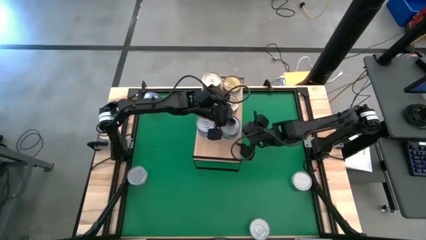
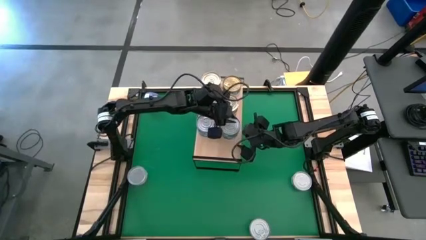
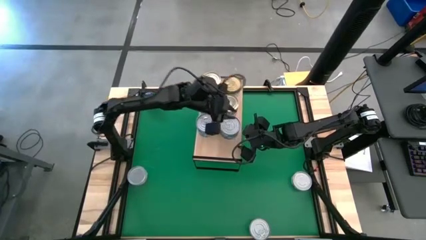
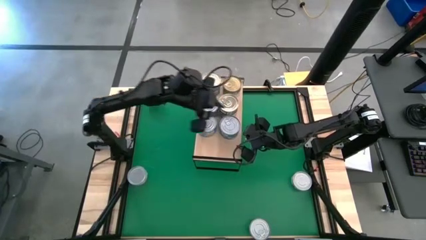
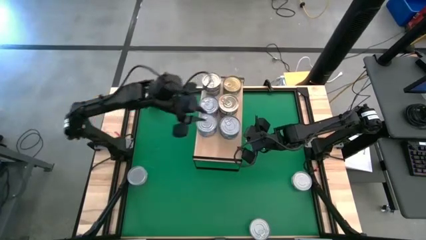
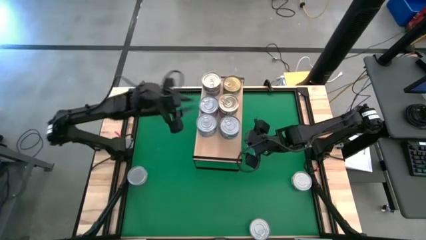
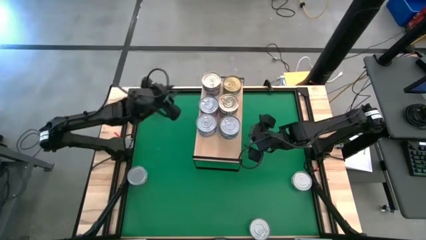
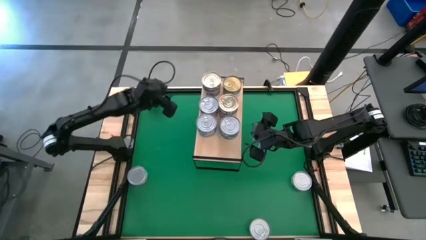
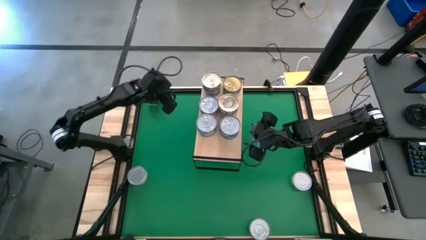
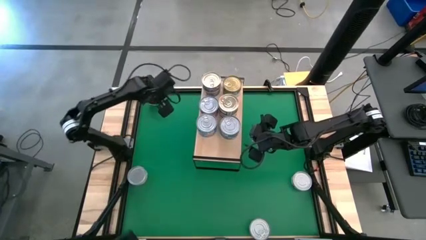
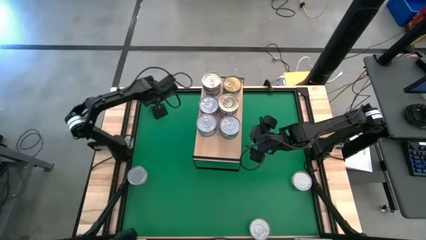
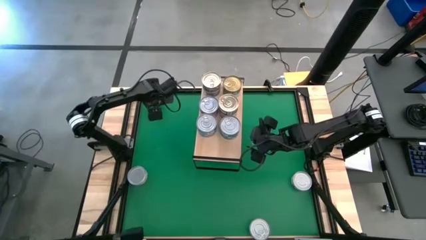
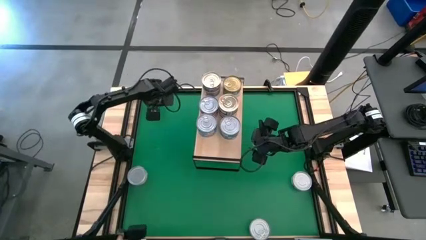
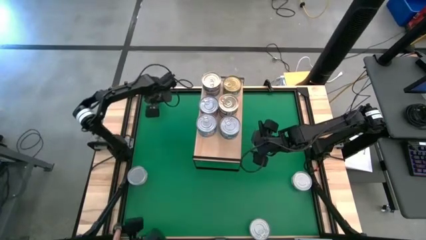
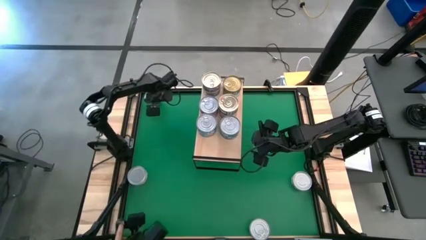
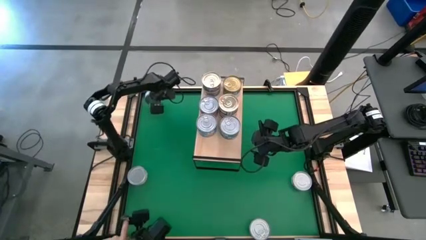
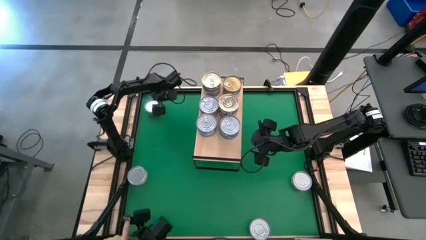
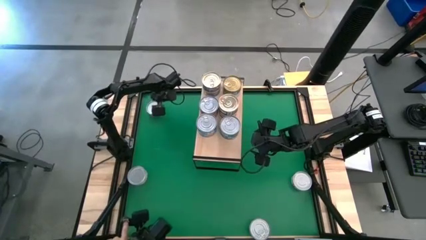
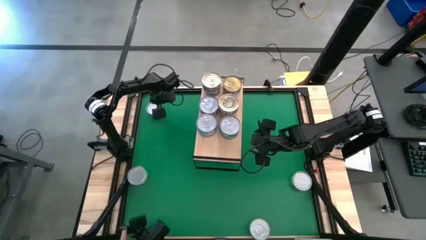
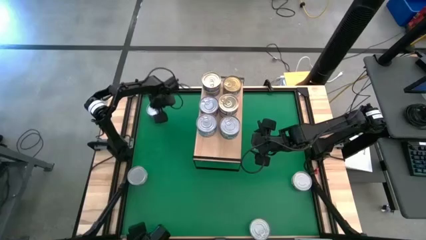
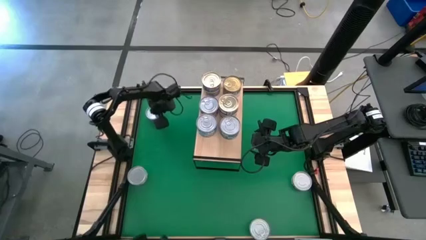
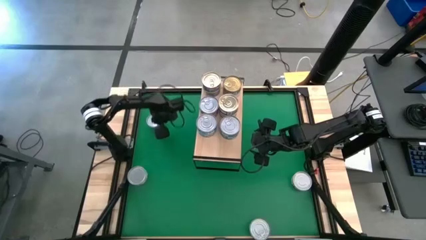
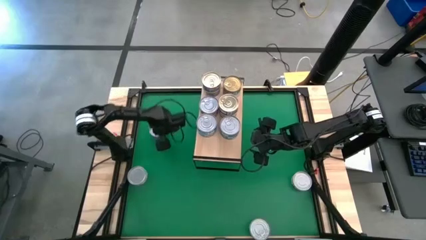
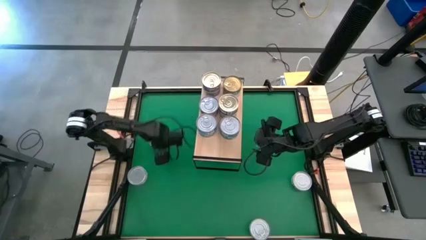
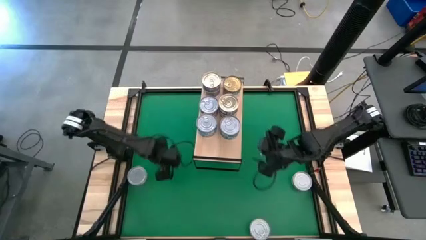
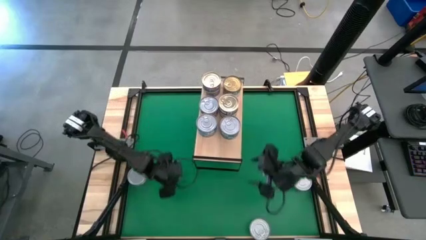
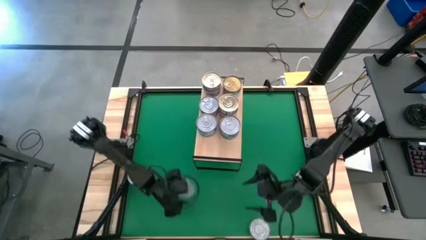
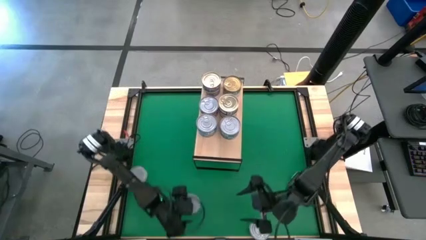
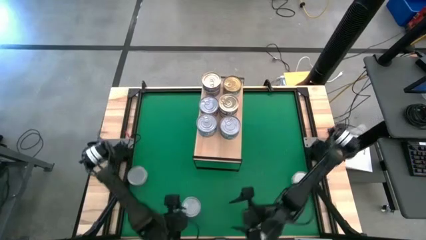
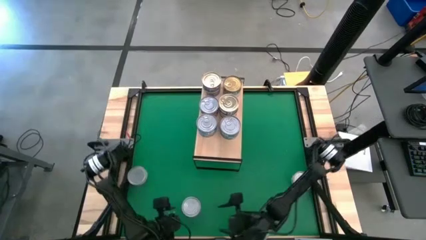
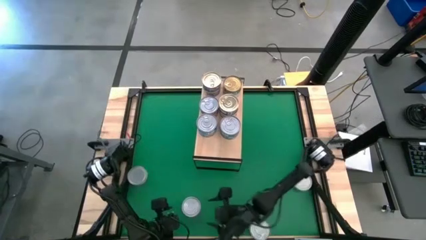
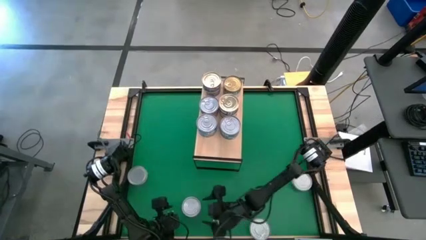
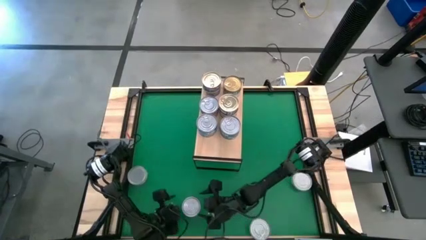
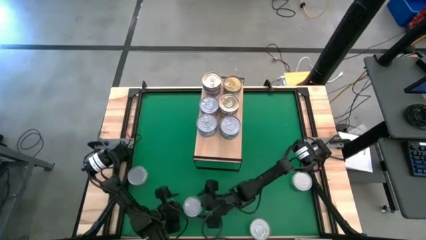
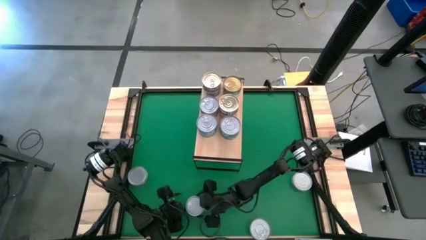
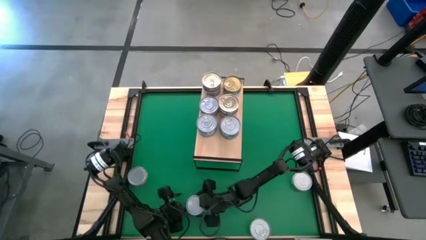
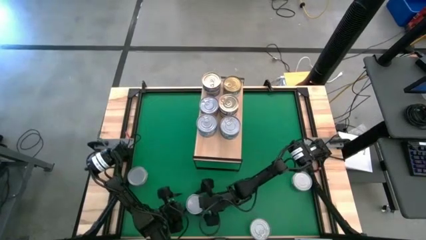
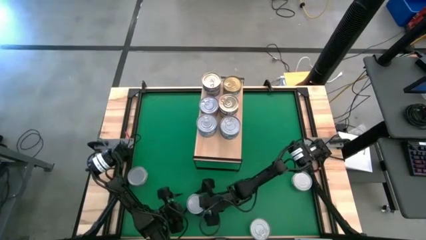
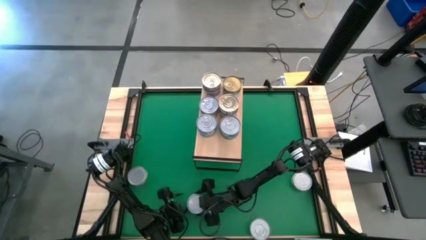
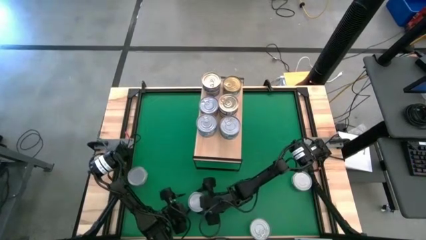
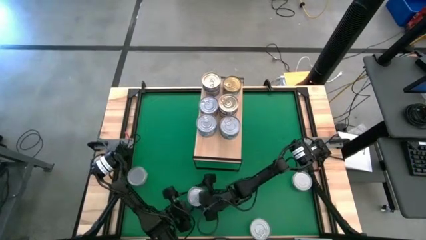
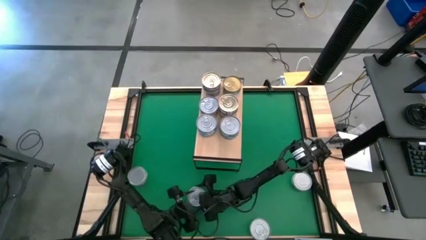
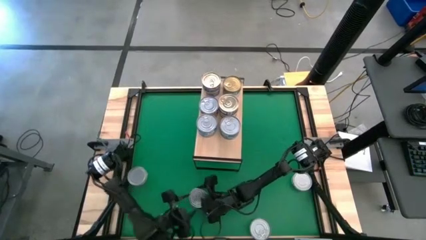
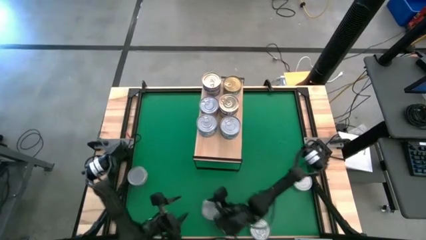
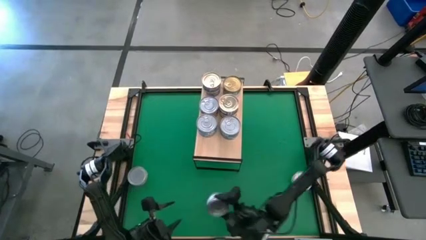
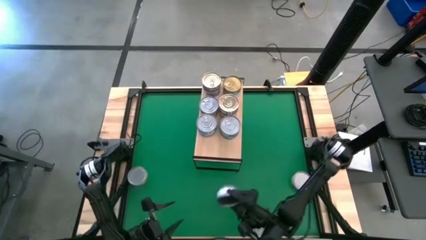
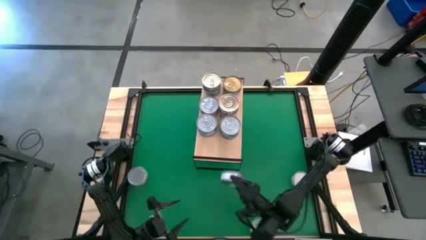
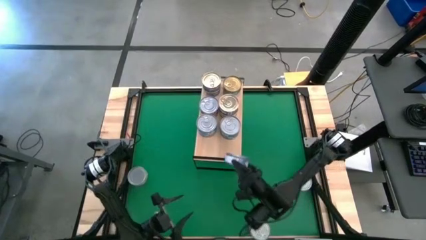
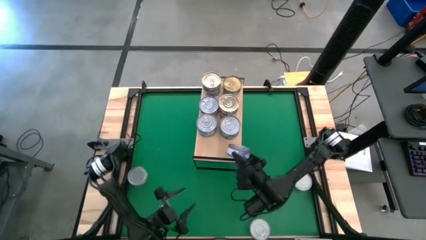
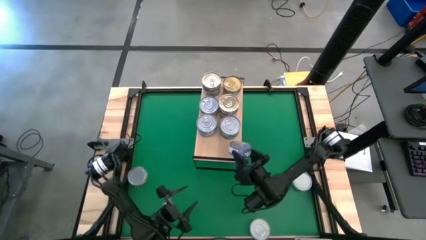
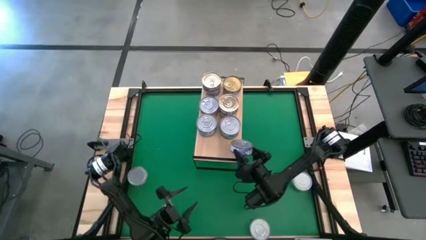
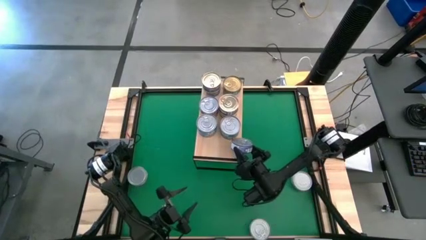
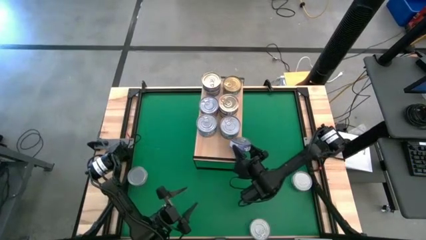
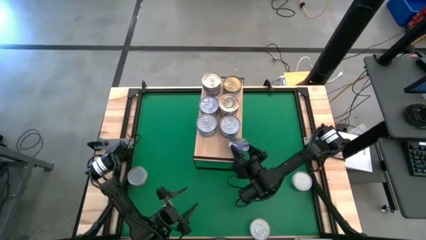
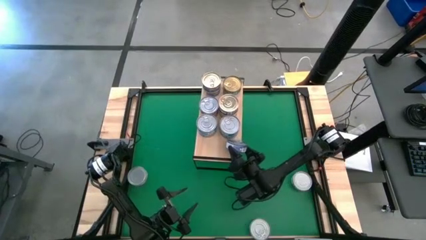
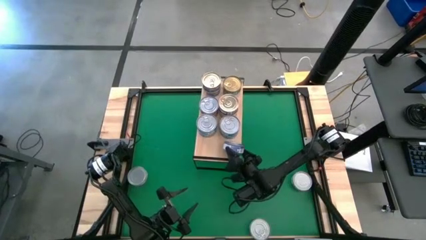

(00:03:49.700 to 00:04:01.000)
Task: Stack canned seafood by type on shelf
Put the blue tuna can on the shelf

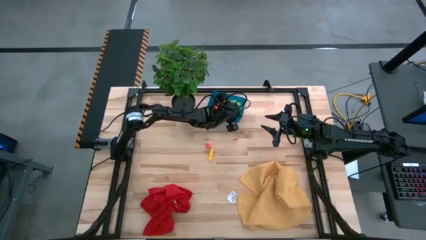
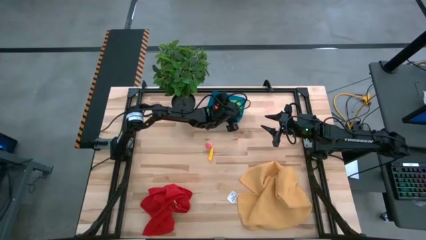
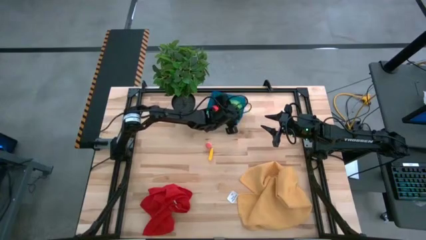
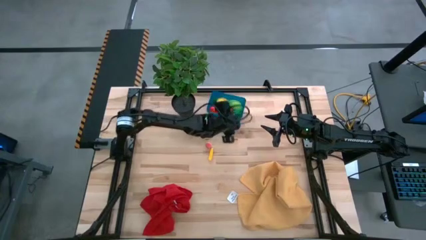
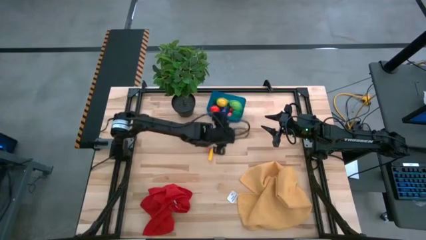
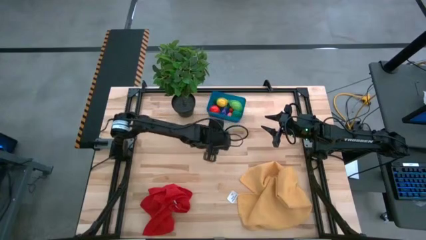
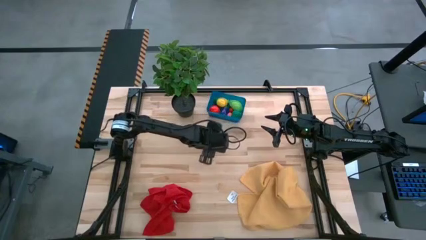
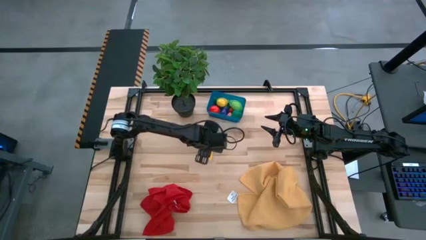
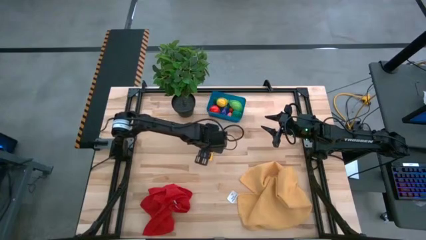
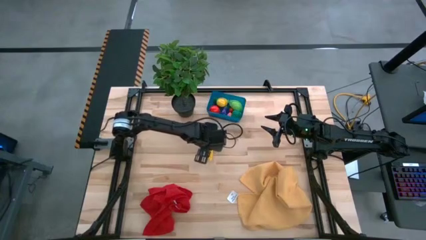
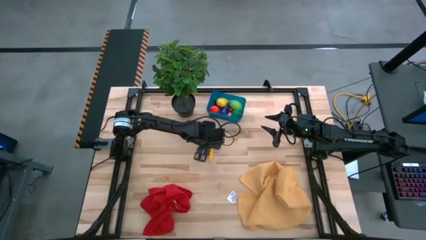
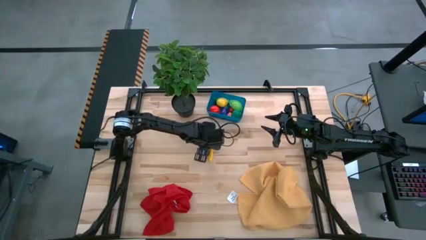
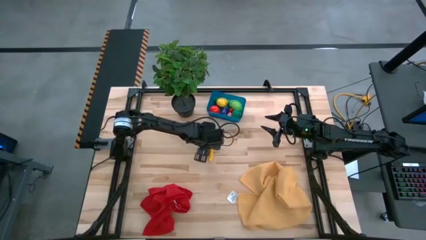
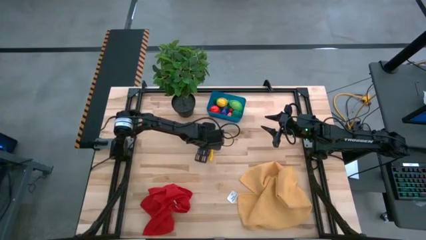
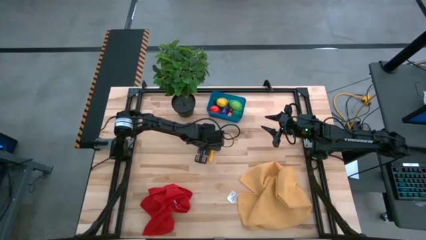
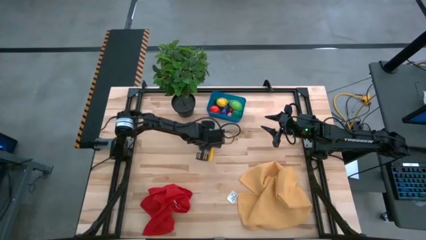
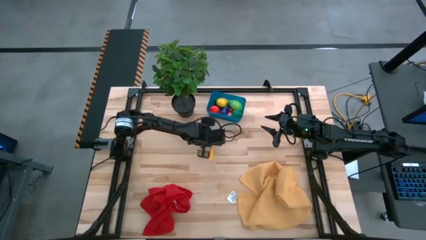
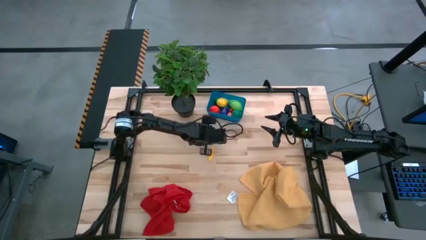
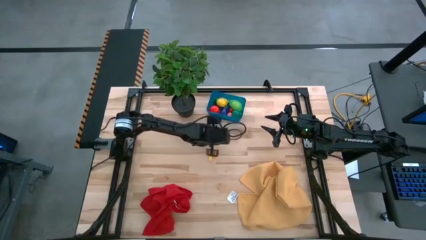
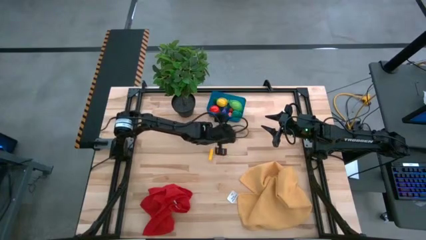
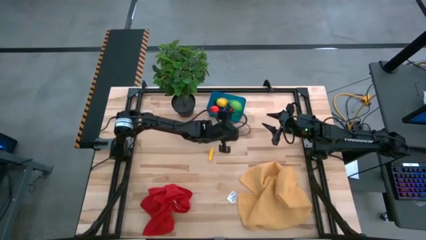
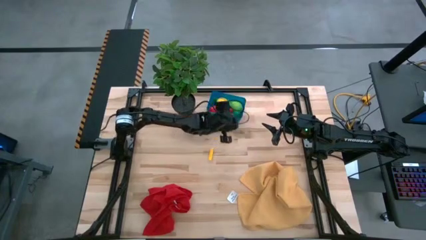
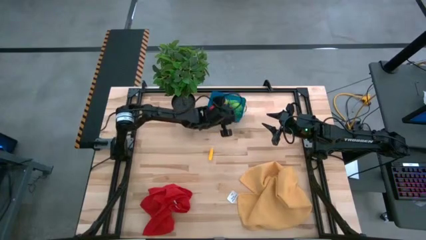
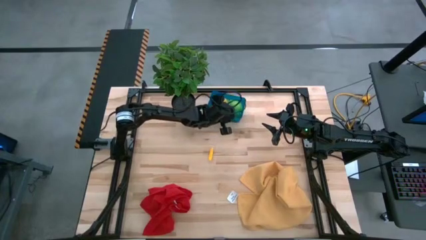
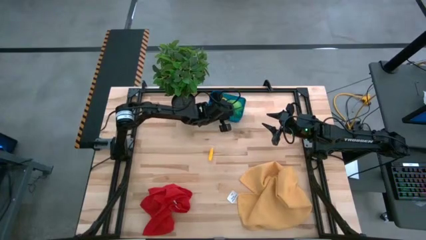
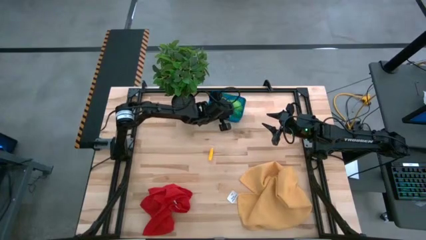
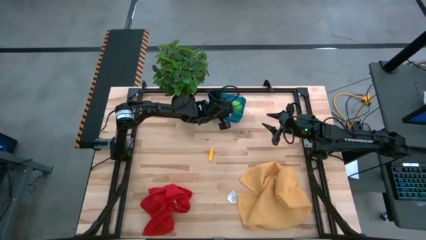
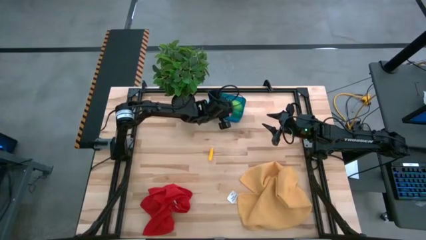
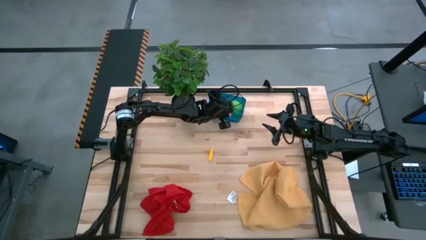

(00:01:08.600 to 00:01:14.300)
Task: Pick and placing Produce into tupperware
Put the pink peach into the blue bin
